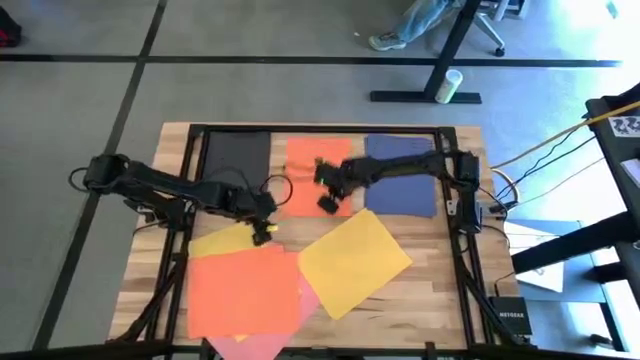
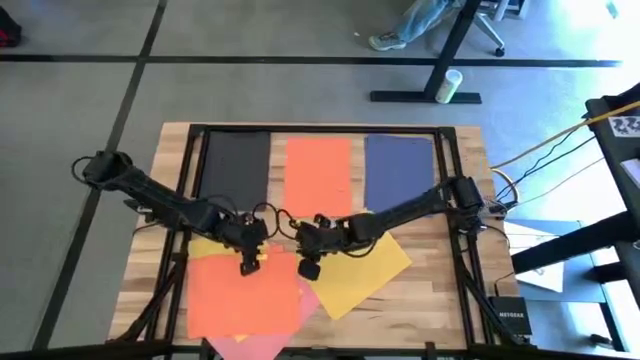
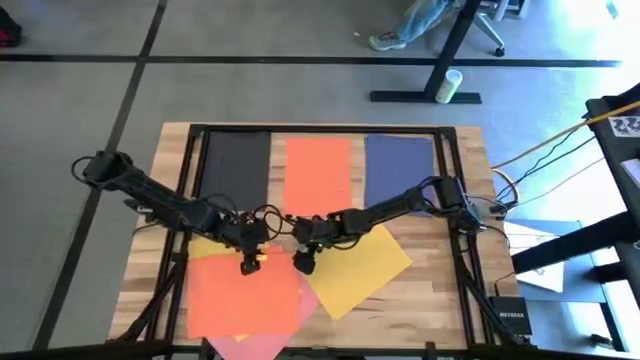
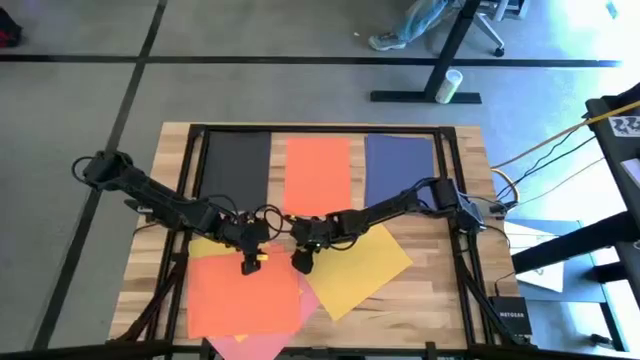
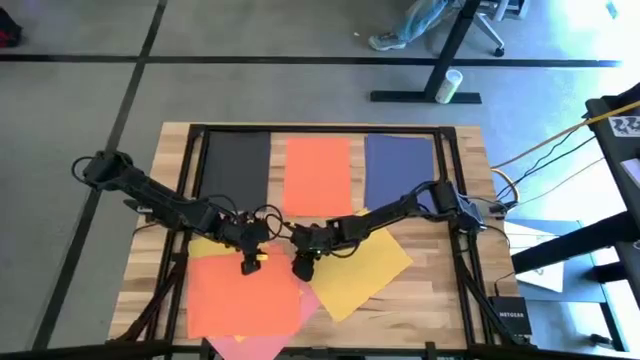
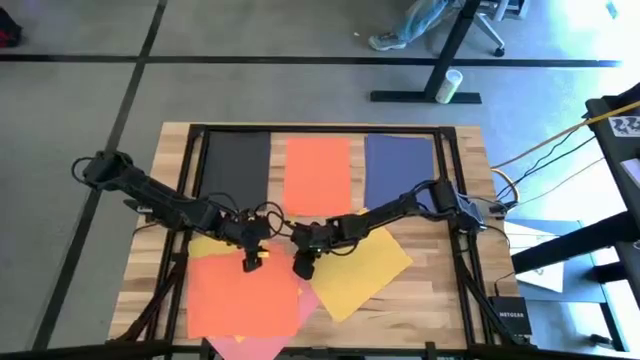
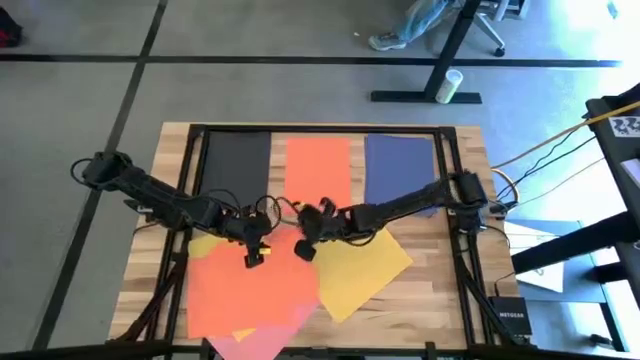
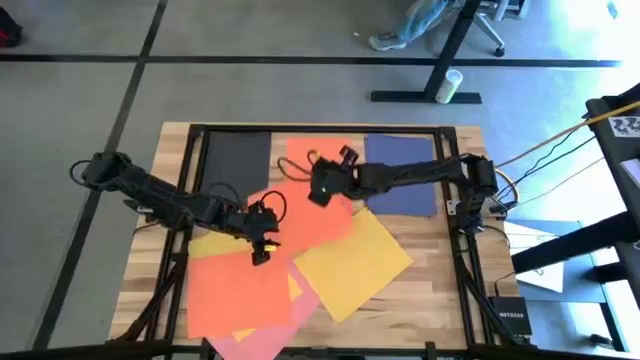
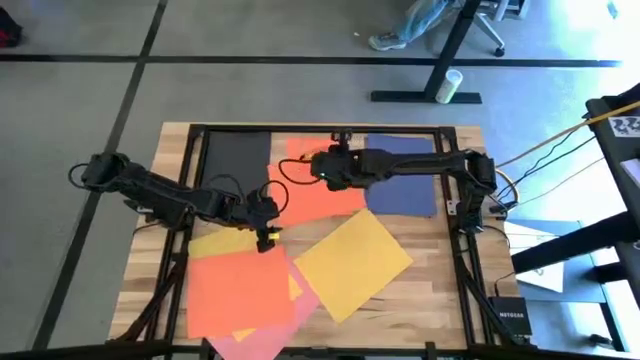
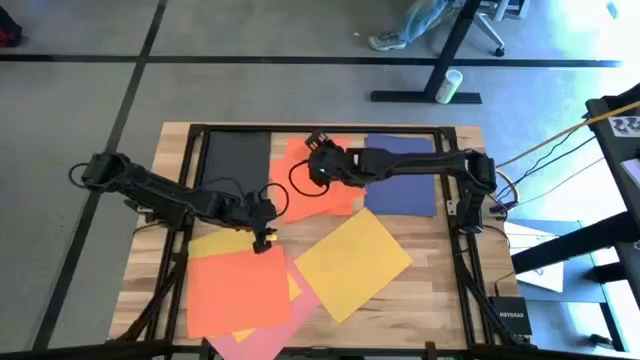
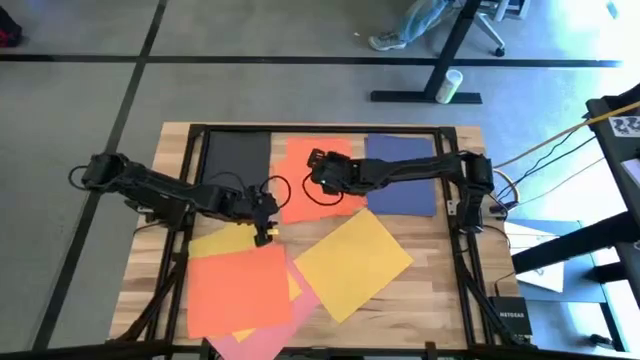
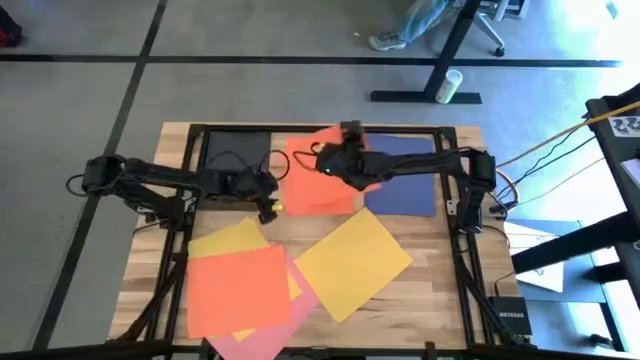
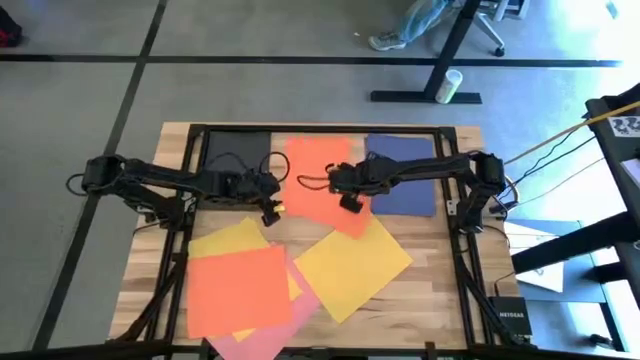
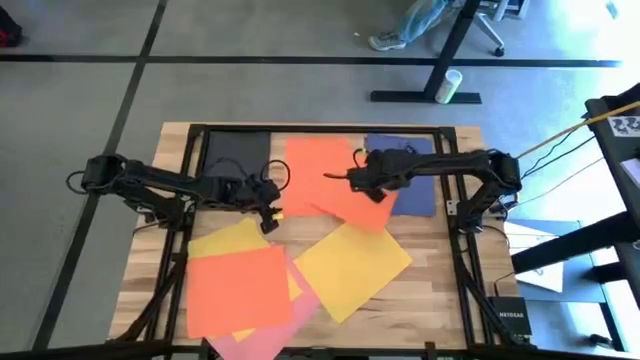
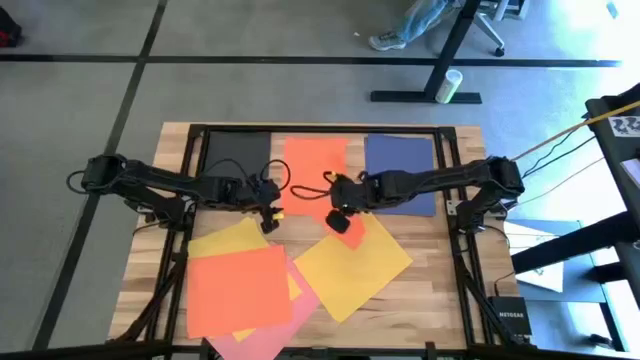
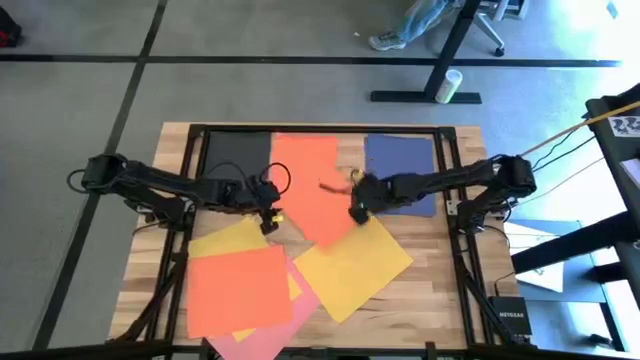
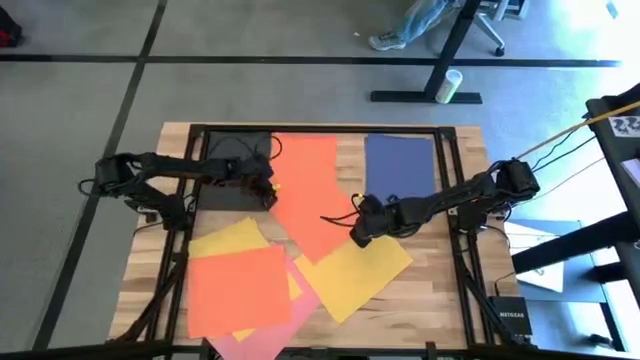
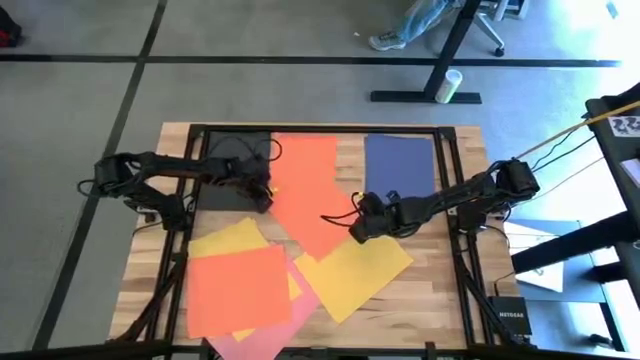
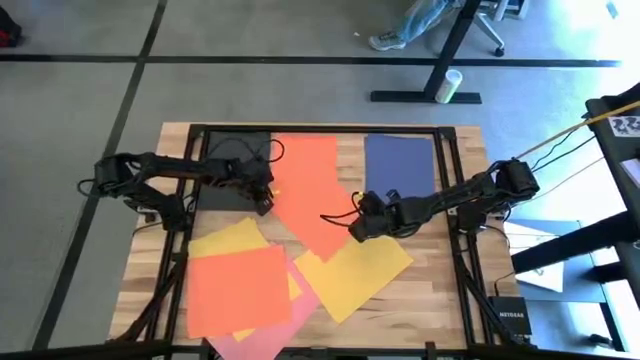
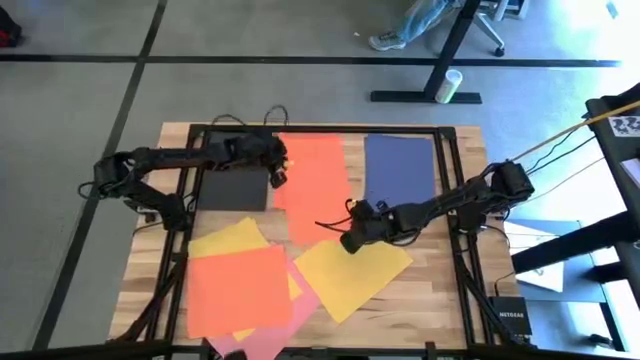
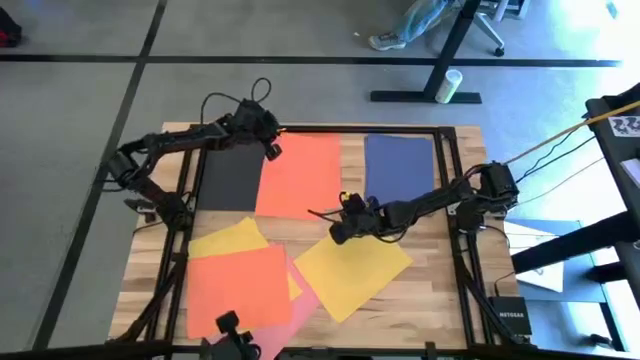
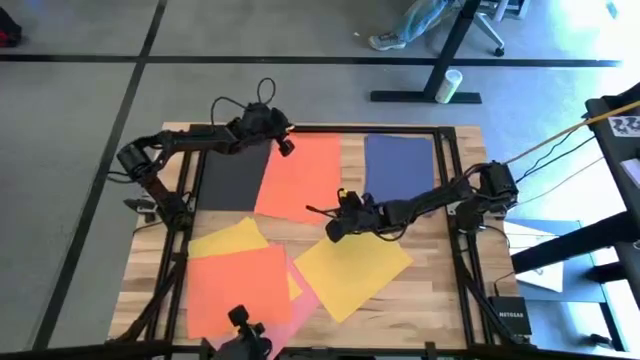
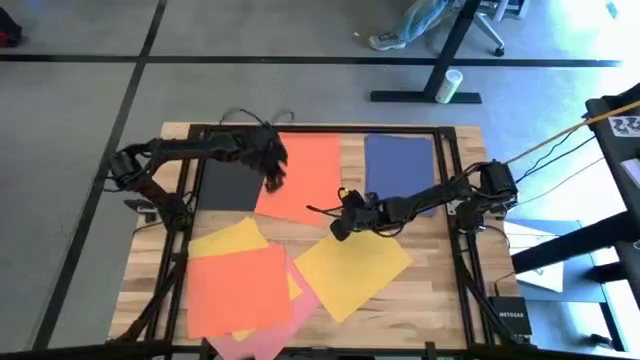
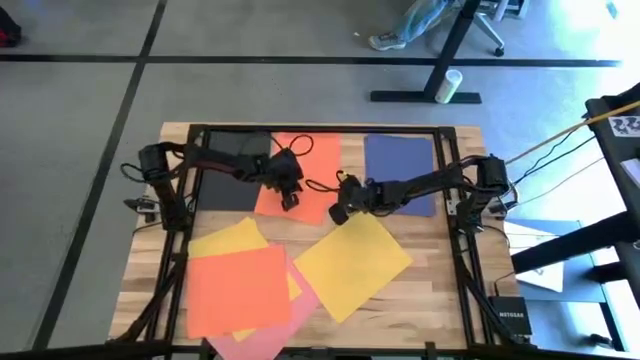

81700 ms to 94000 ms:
Task: Organize paper
Stack the orange on top of the other orange paper

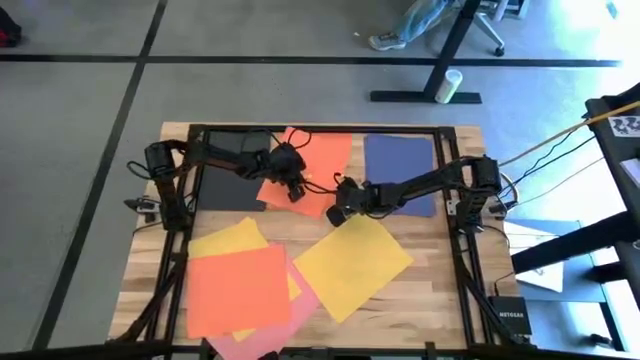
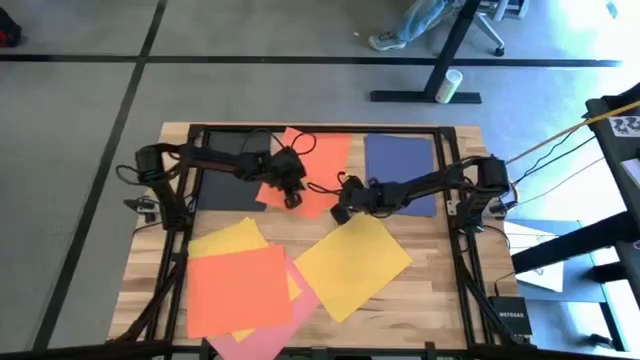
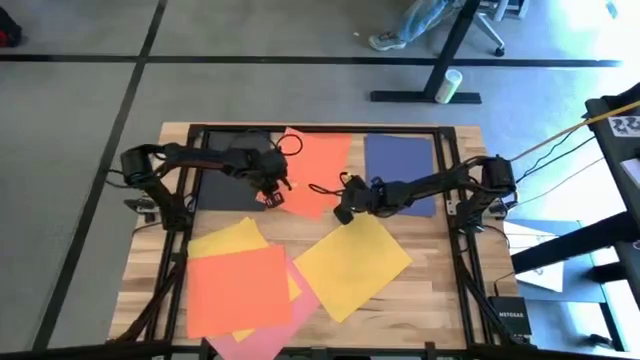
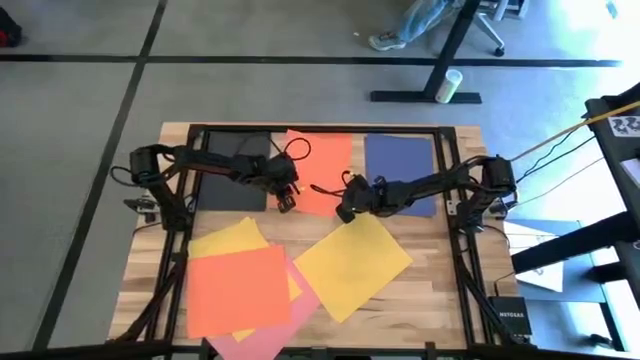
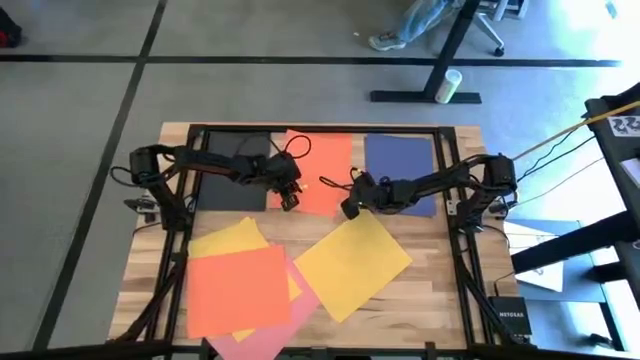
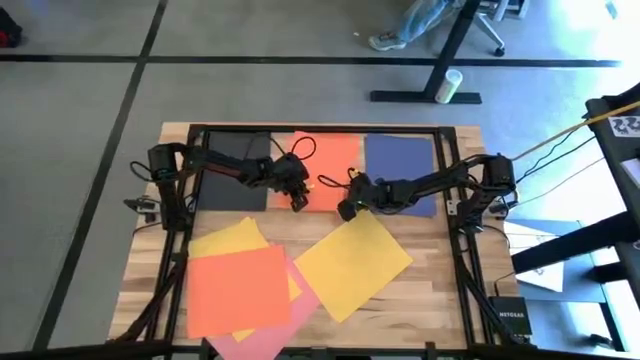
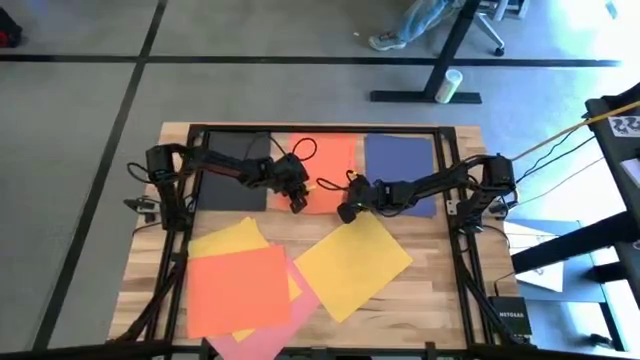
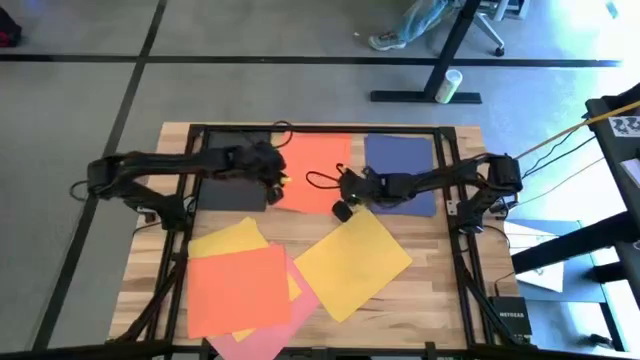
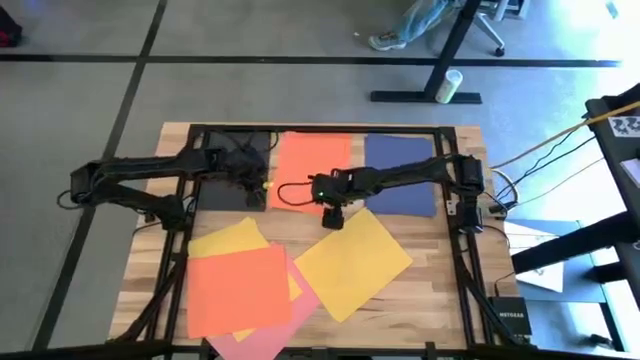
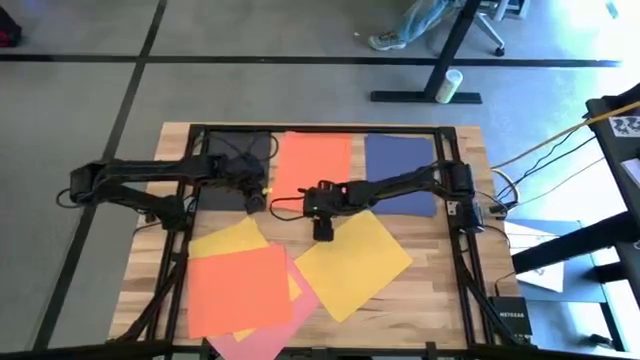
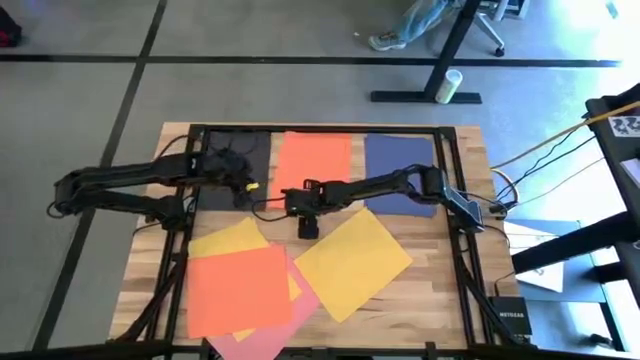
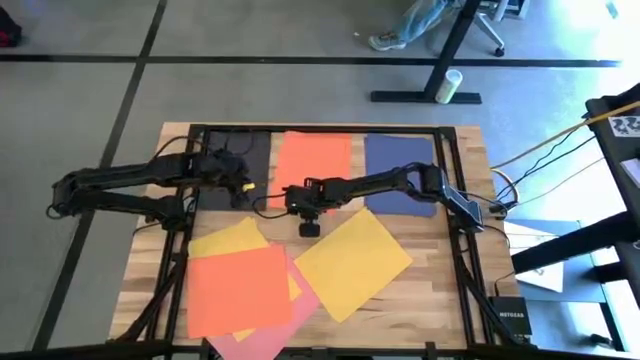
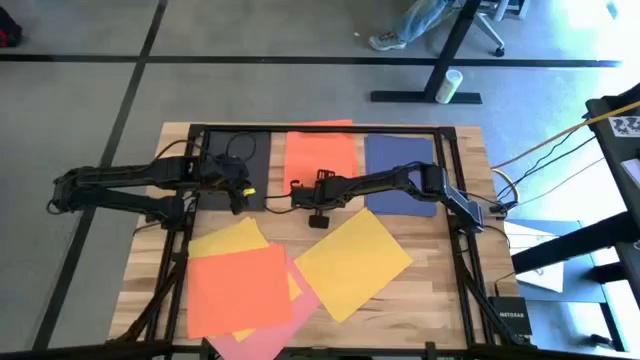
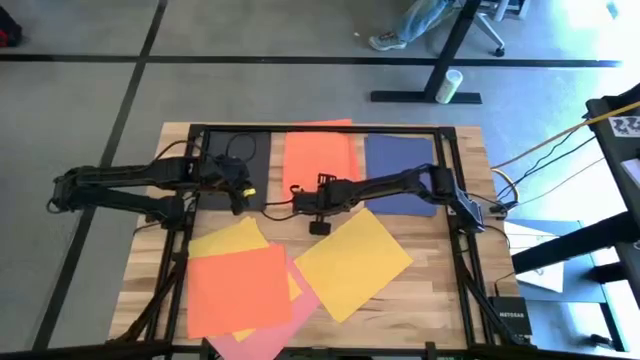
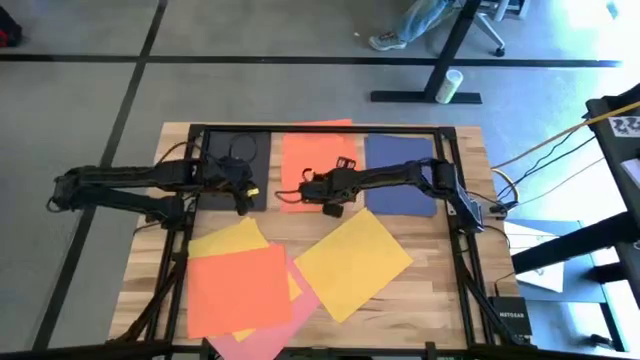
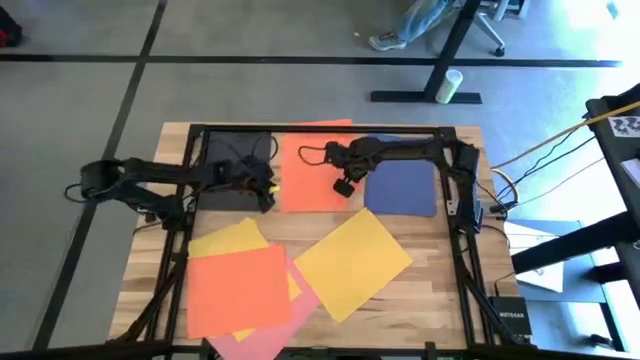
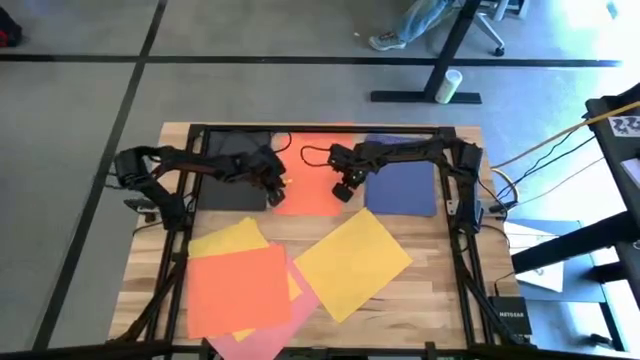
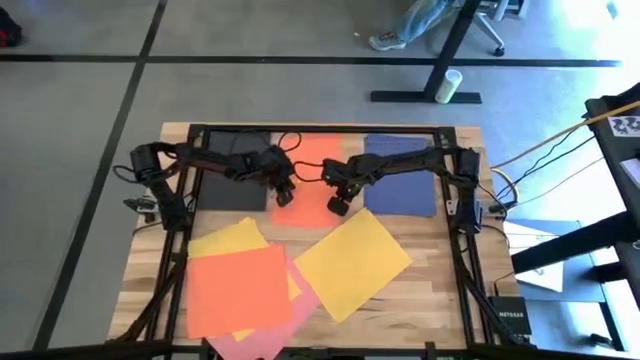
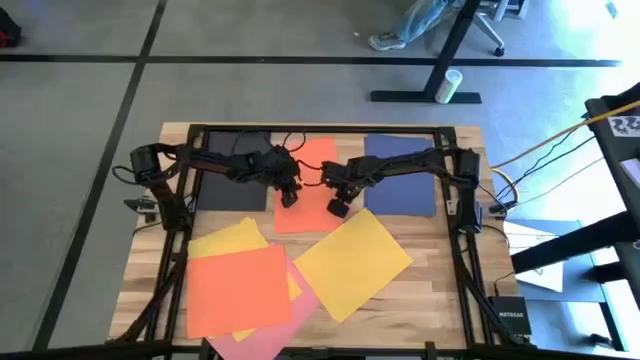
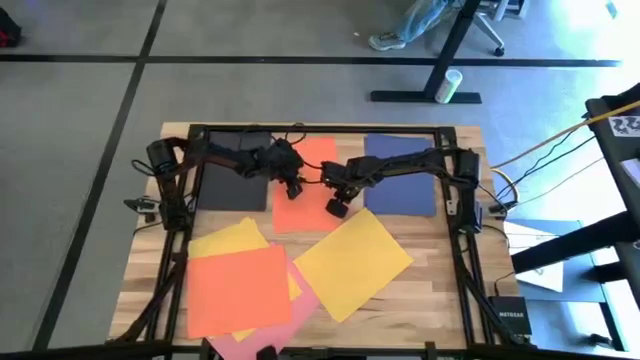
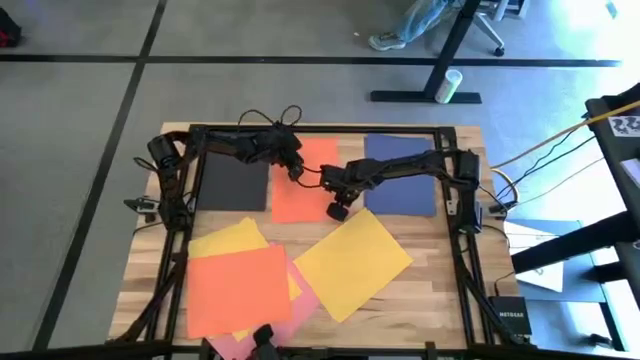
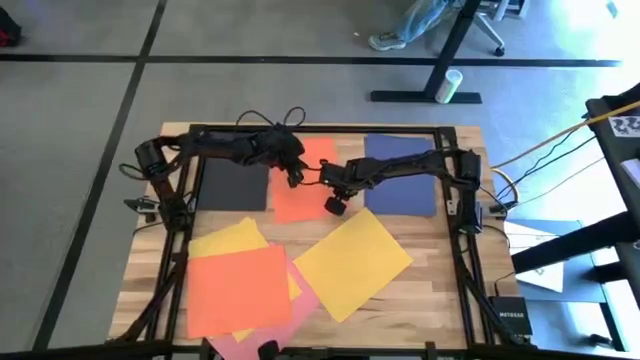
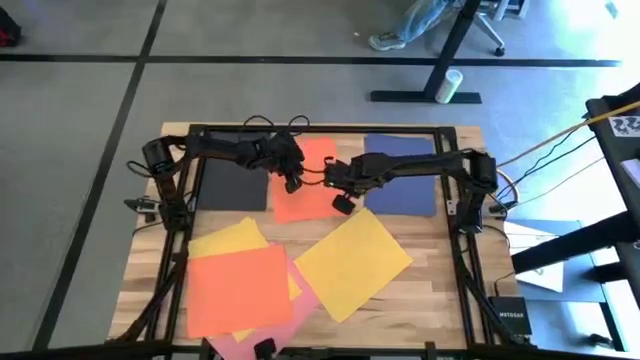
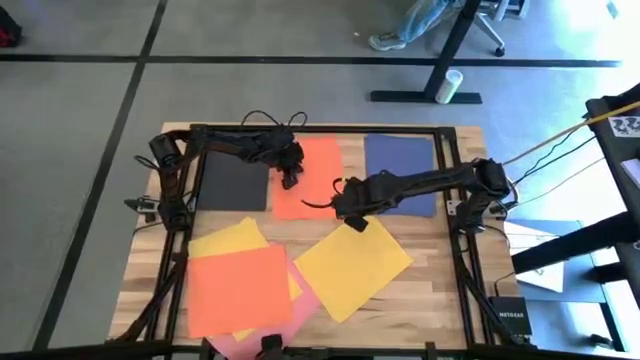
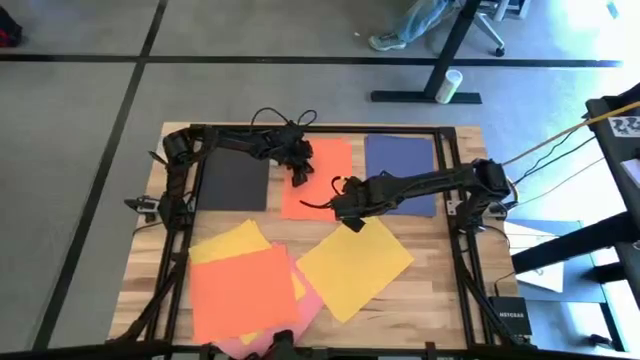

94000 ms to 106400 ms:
Stack the orange on top of the other orange paper
